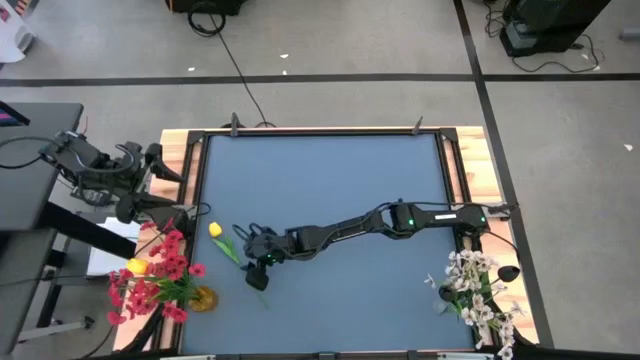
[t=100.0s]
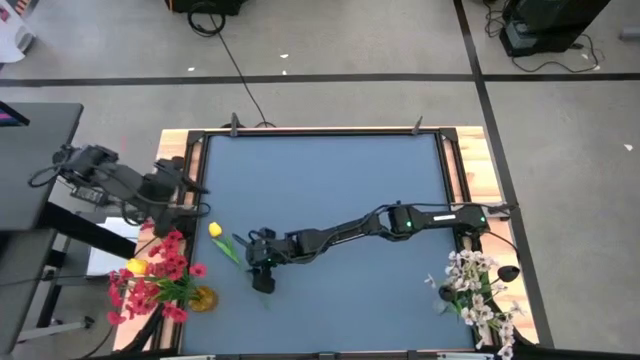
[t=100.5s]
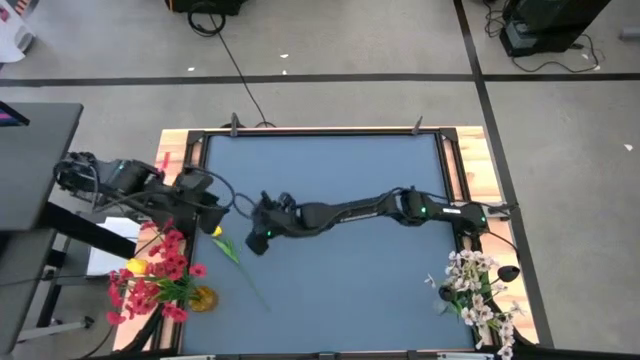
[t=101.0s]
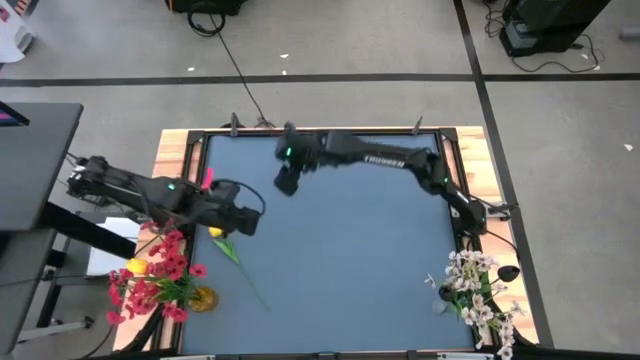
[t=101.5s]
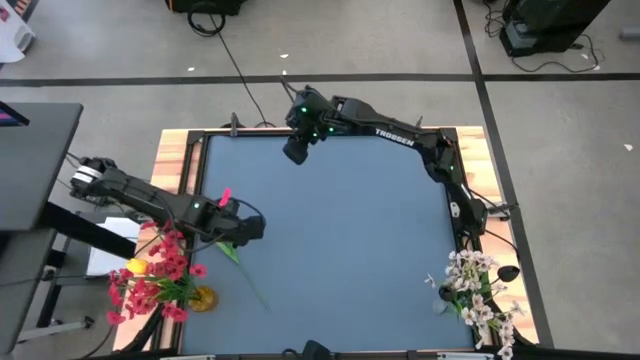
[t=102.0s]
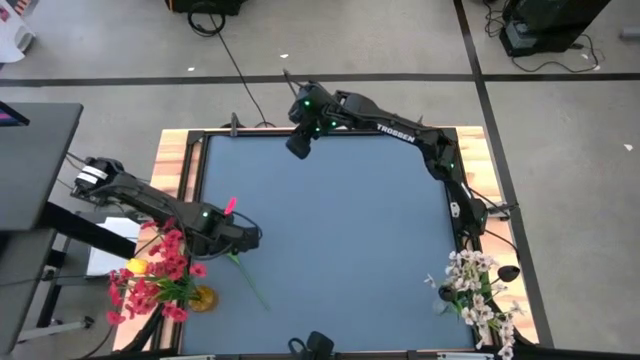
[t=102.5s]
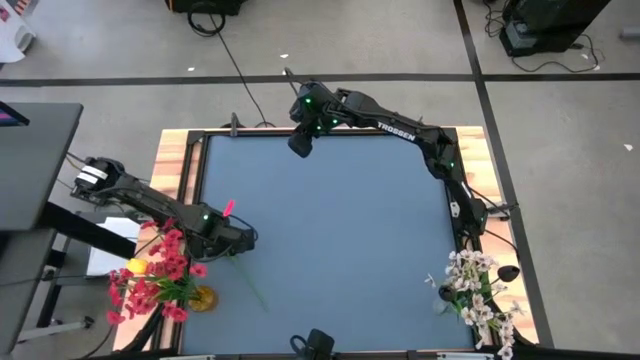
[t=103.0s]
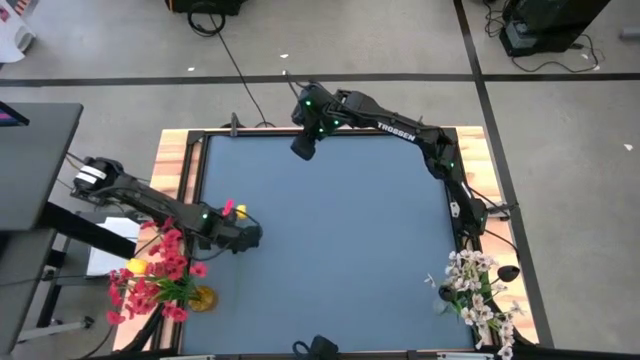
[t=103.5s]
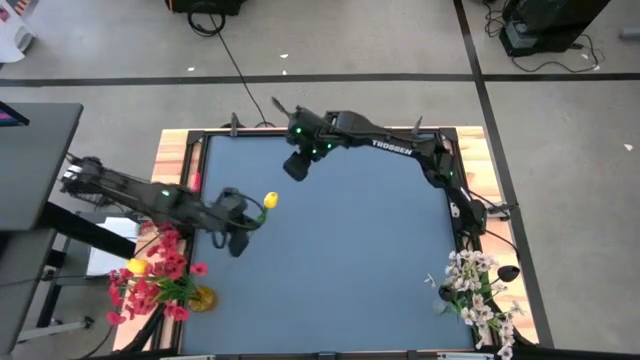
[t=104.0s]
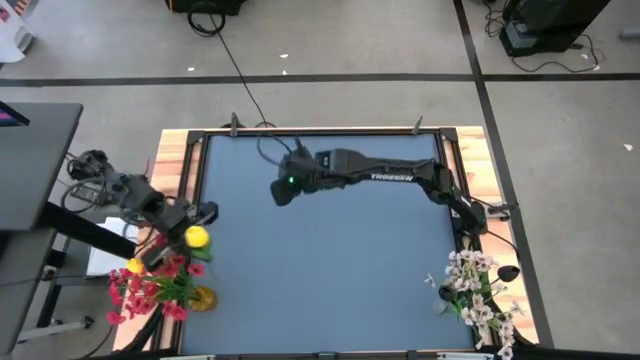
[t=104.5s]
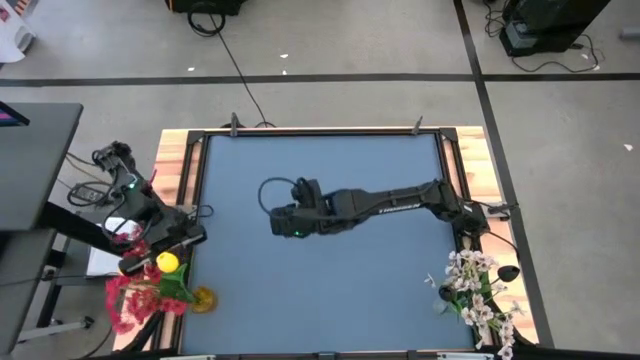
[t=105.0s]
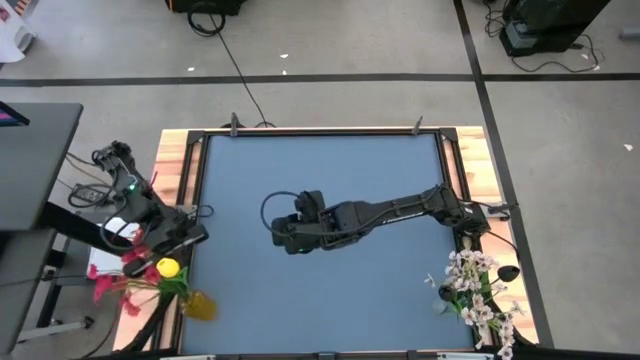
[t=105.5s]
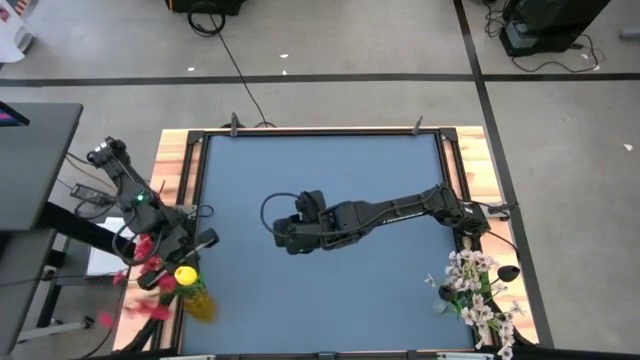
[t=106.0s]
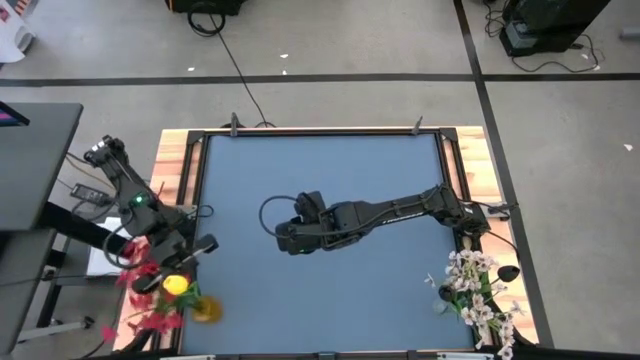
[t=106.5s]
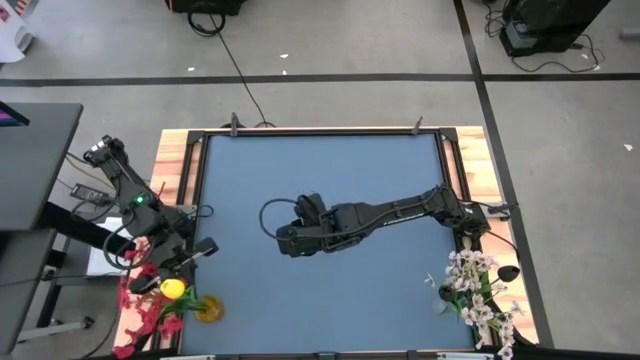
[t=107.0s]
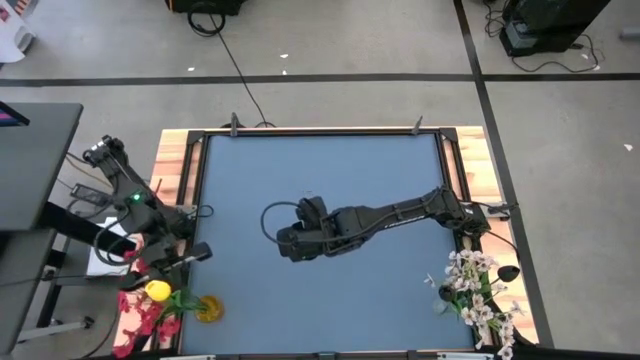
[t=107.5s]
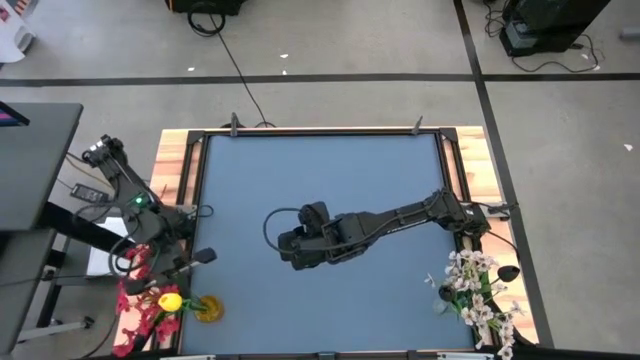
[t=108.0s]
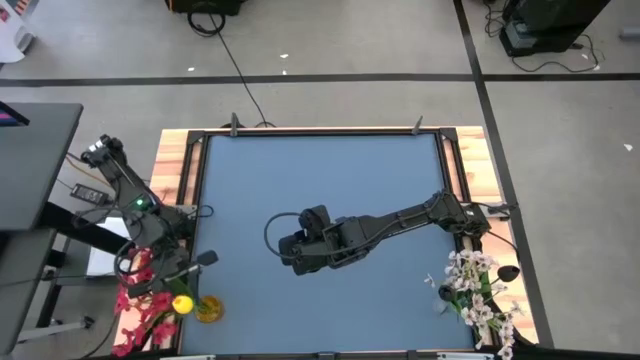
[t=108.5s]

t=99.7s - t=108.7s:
Task: Sort flowers into vase by color
Put the yellow flower into the yellow vase

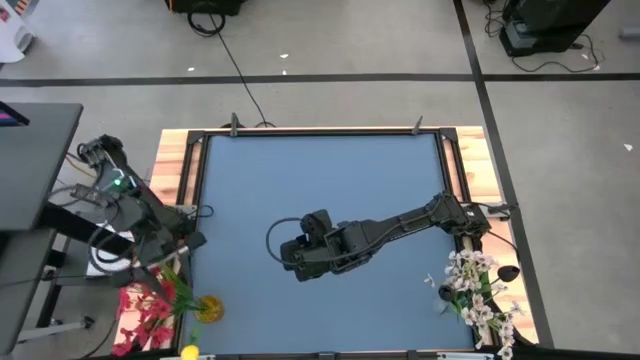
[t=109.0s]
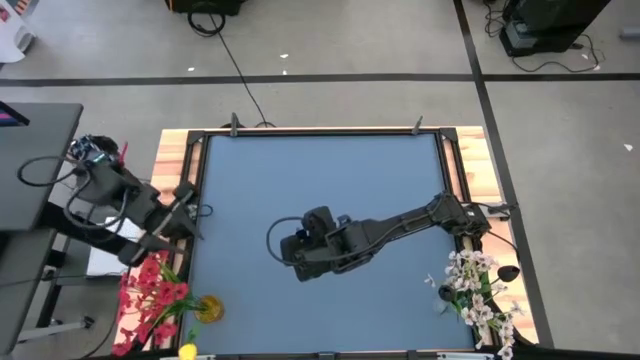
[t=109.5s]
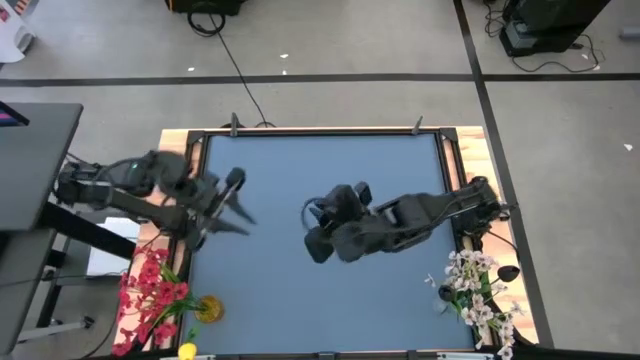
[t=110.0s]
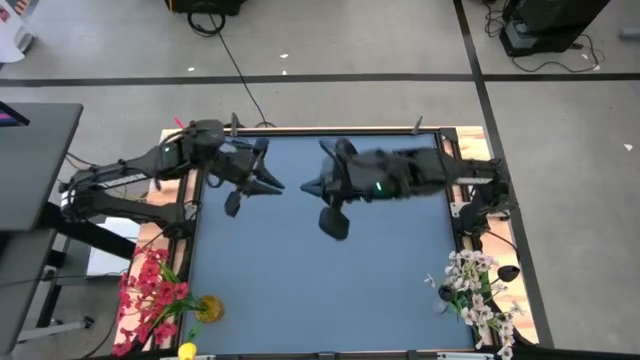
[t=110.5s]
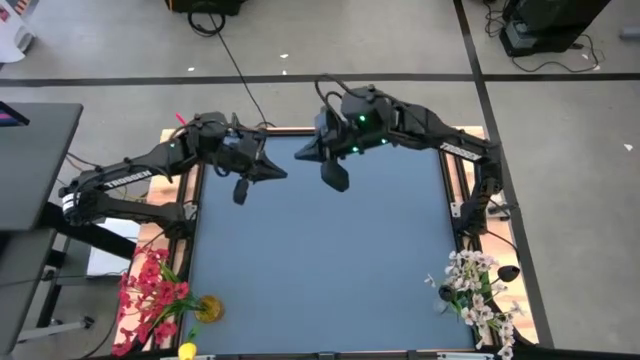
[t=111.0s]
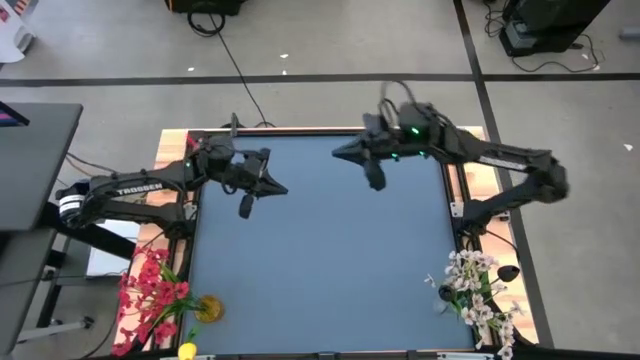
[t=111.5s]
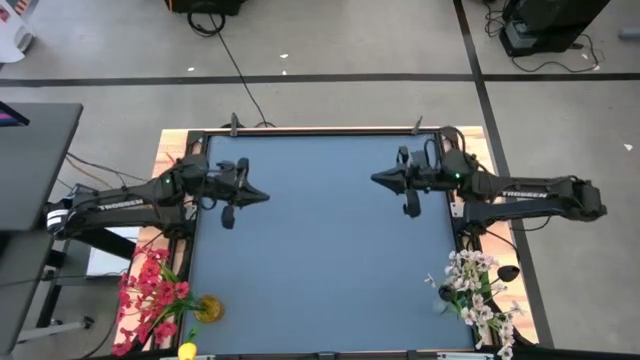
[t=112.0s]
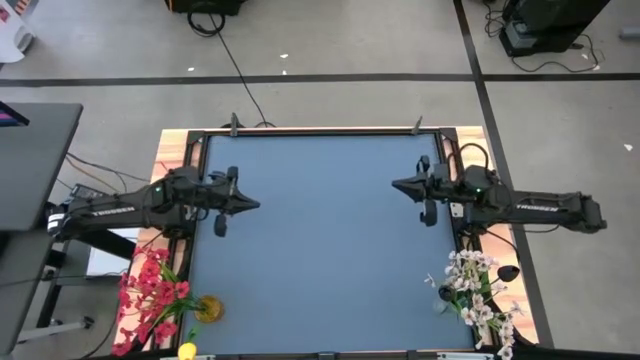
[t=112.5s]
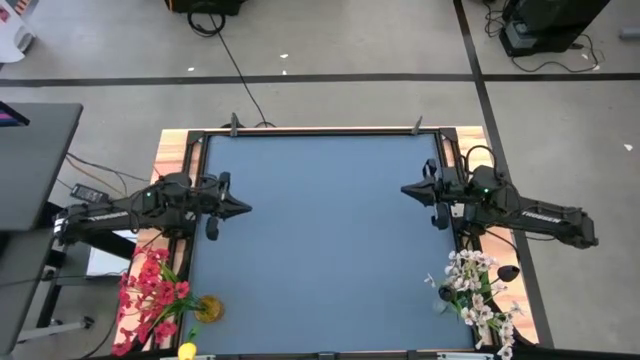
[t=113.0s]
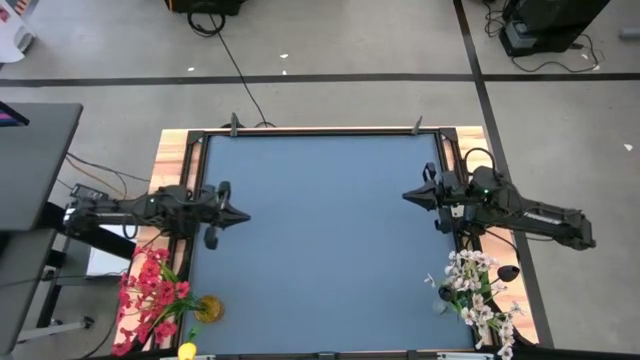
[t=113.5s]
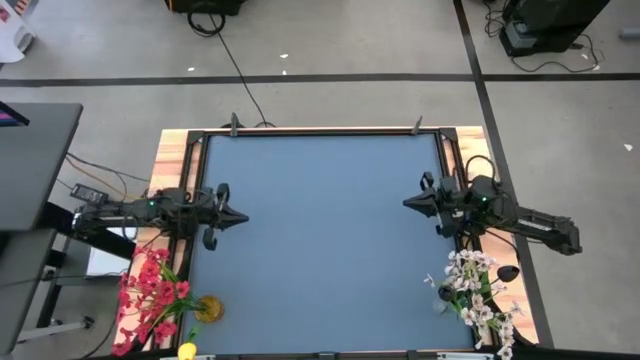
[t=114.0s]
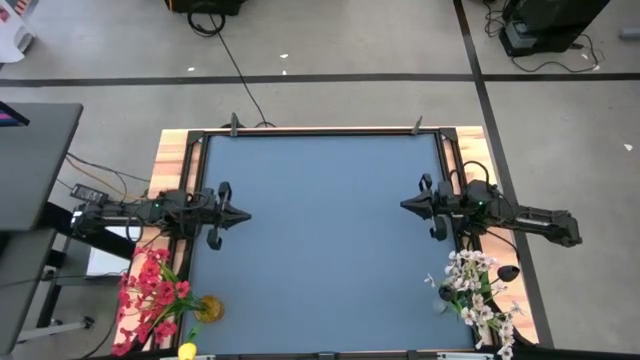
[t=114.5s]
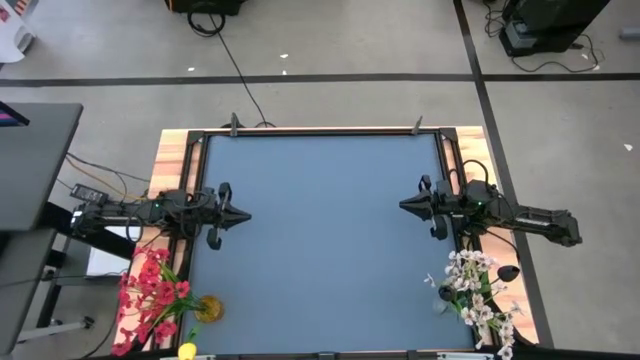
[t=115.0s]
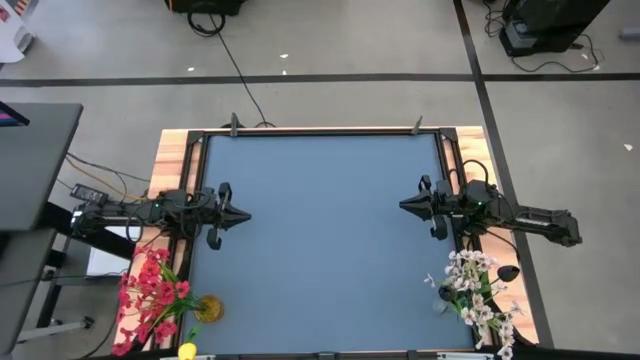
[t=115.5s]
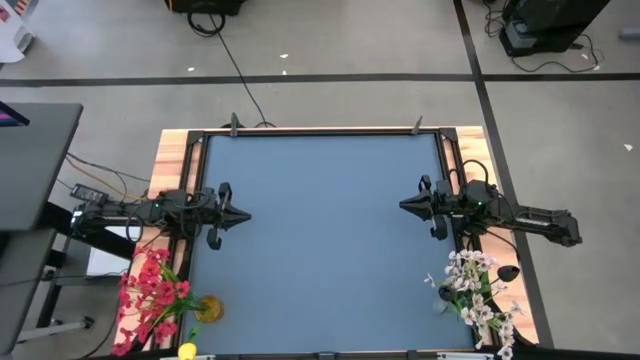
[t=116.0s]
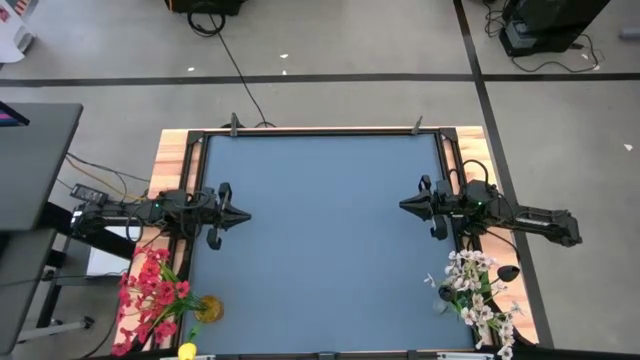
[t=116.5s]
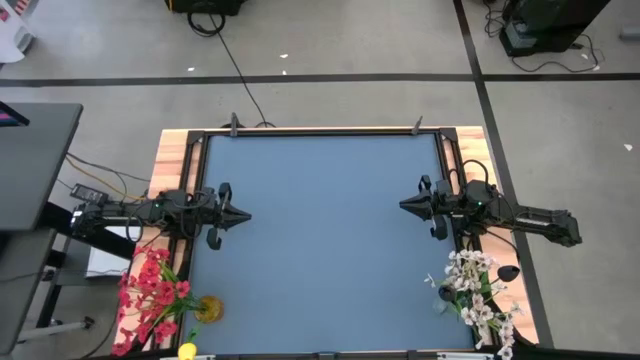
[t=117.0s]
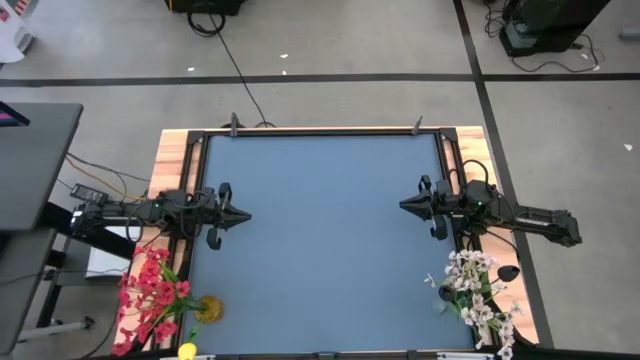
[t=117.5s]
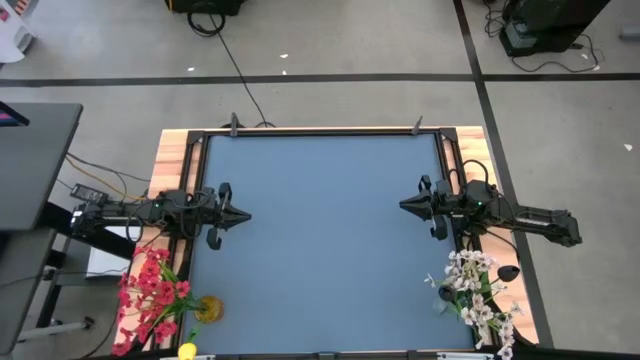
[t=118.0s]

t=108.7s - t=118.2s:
Return to Home Position

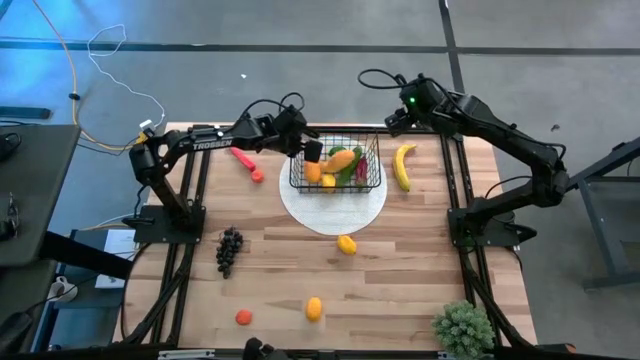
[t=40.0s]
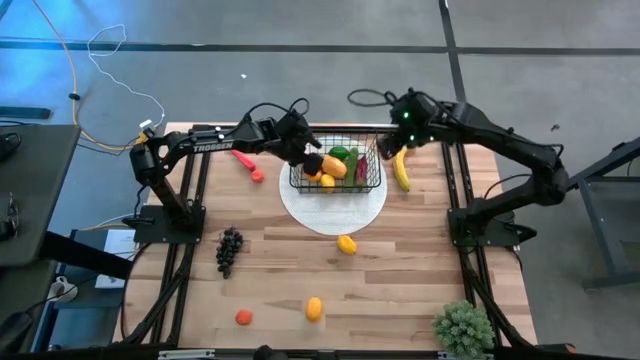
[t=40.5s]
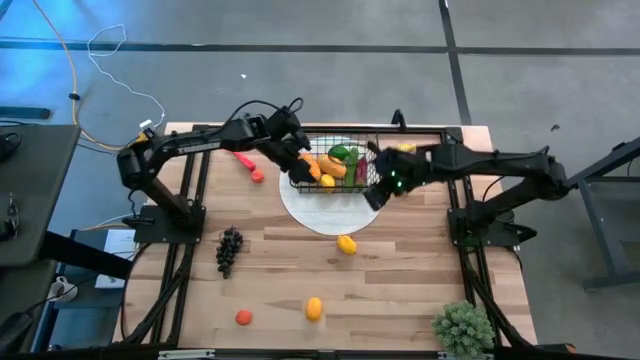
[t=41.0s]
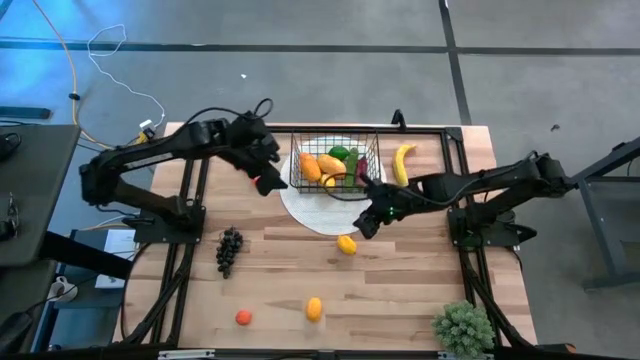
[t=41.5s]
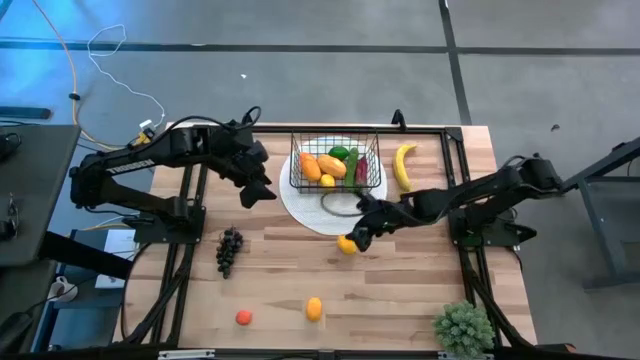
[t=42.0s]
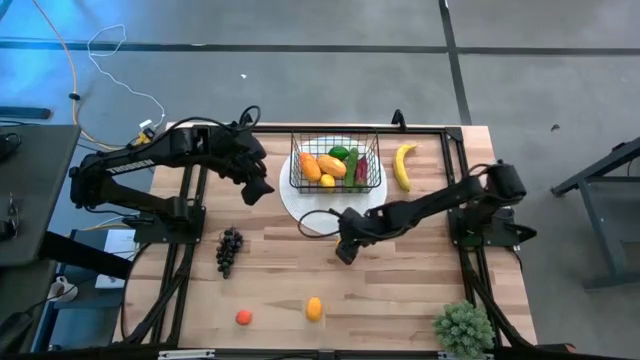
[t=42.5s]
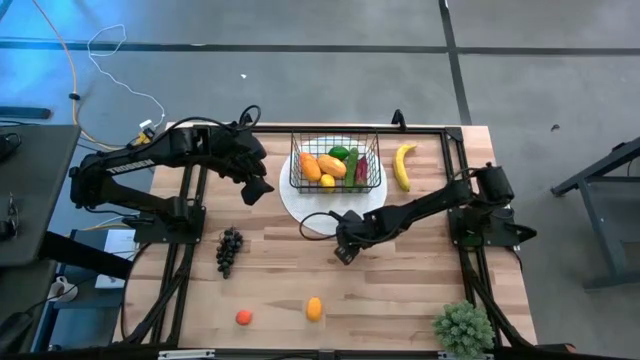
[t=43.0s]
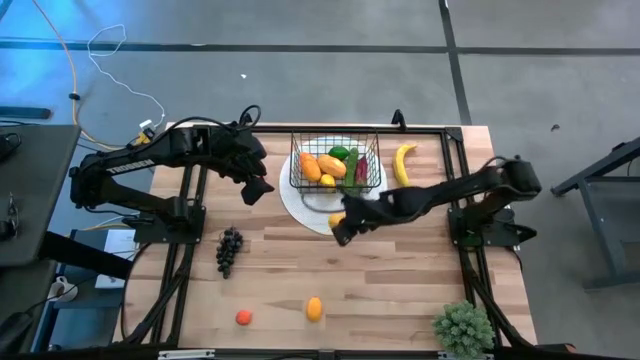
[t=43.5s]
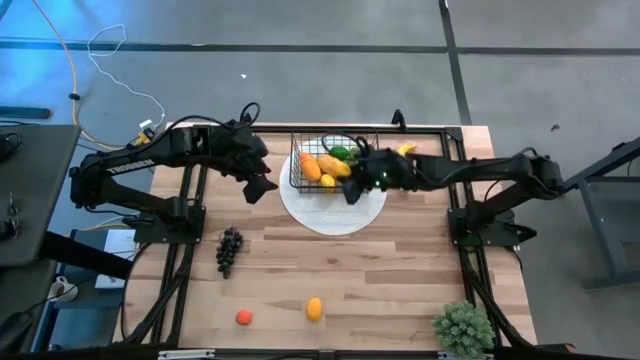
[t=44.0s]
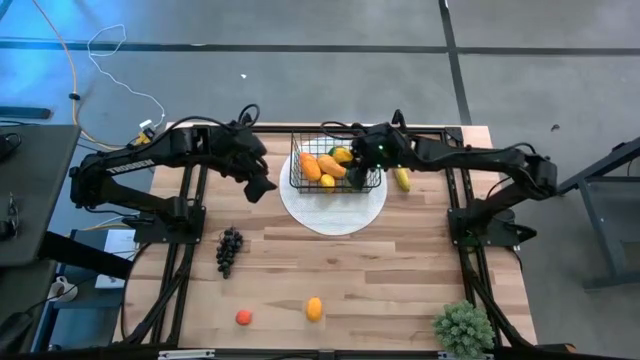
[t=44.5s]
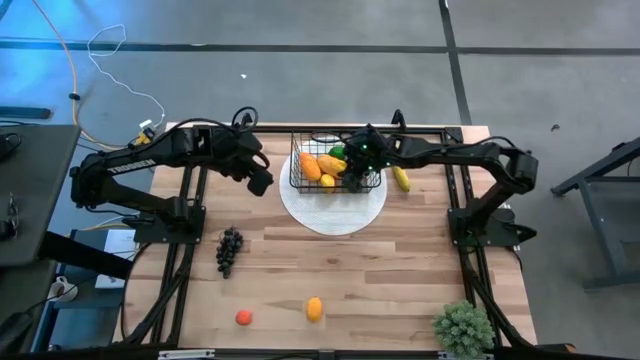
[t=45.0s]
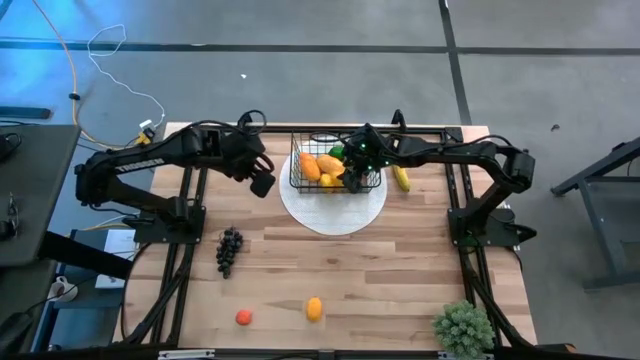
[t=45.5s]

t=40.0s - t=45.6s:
Task: Build produce basket
Put the top yellow lemon into the black wire basket
